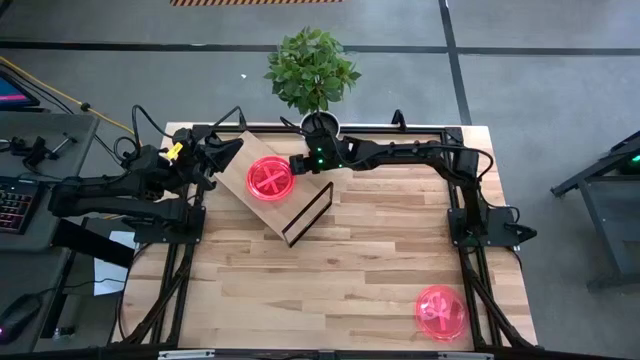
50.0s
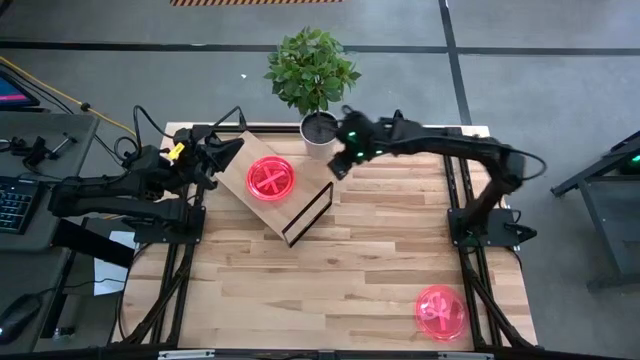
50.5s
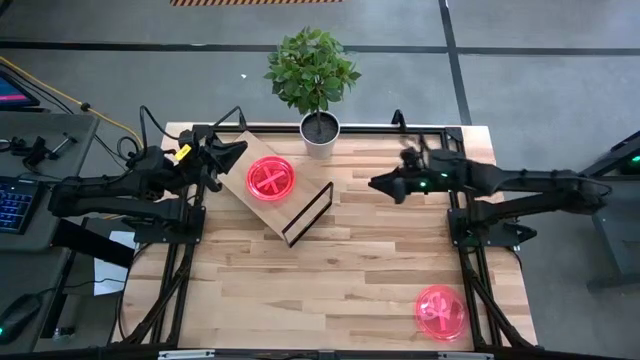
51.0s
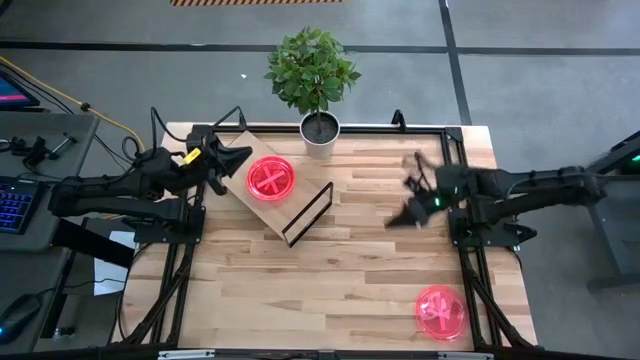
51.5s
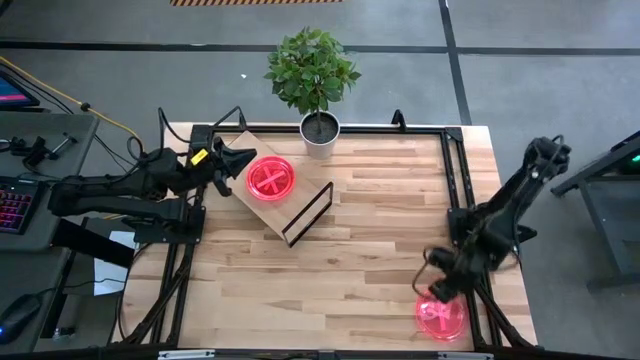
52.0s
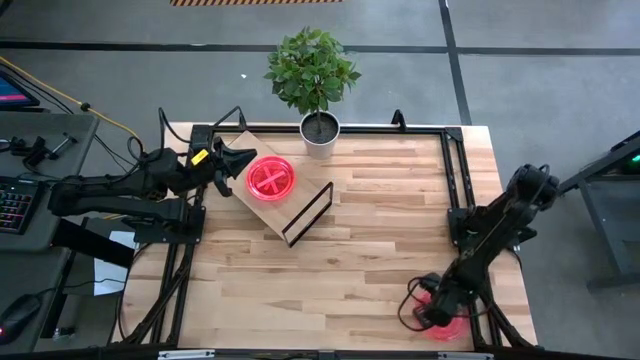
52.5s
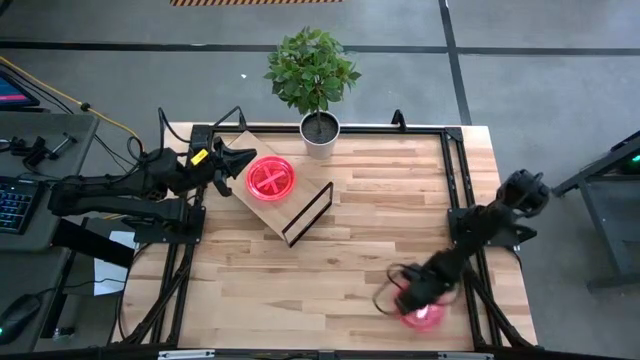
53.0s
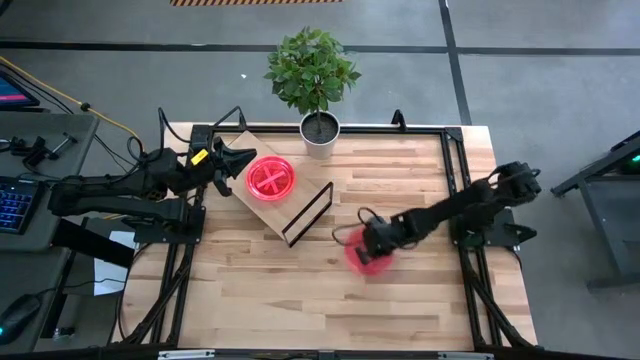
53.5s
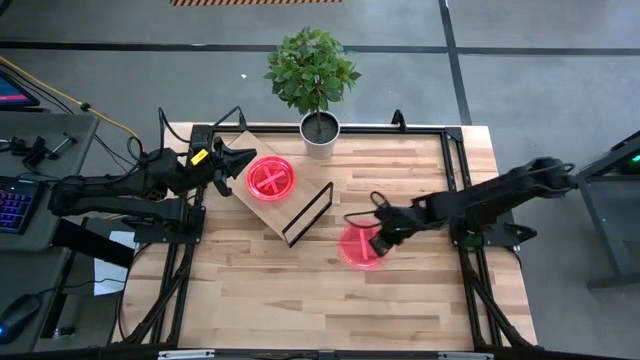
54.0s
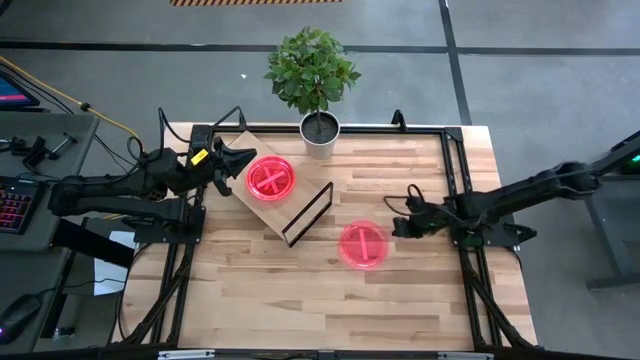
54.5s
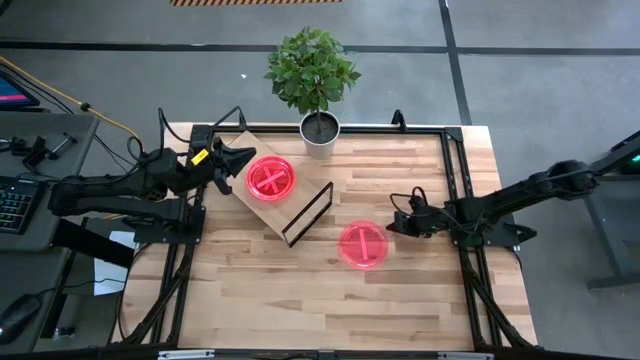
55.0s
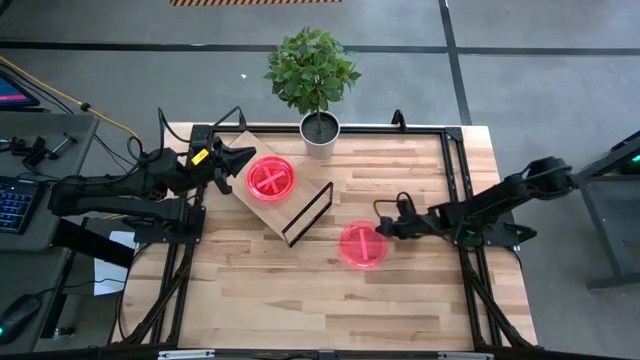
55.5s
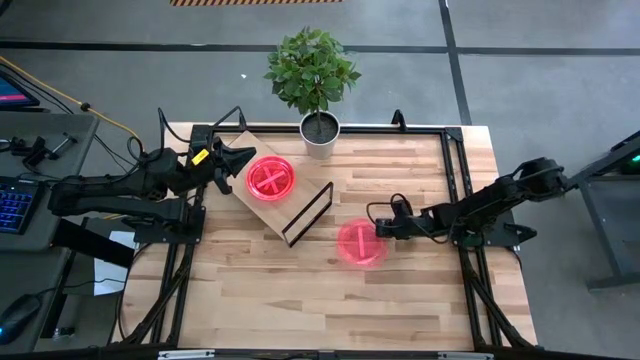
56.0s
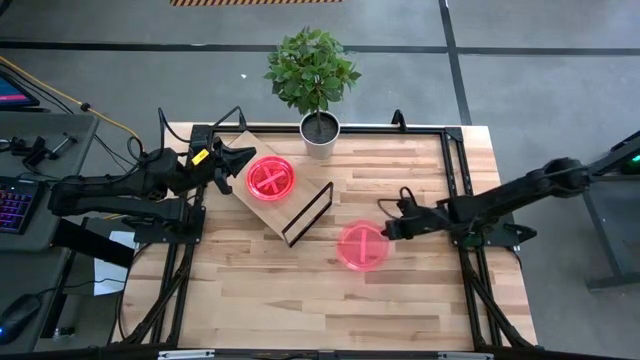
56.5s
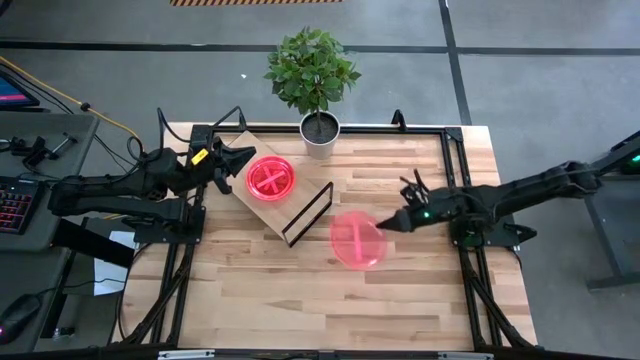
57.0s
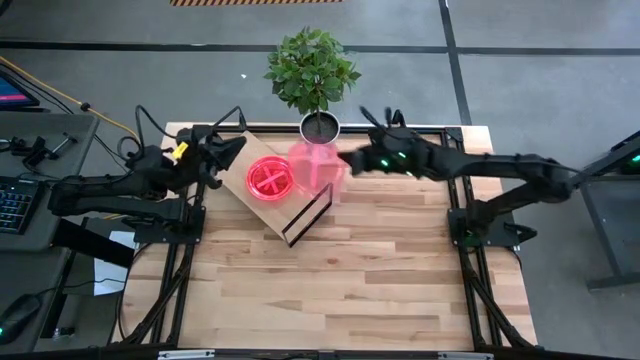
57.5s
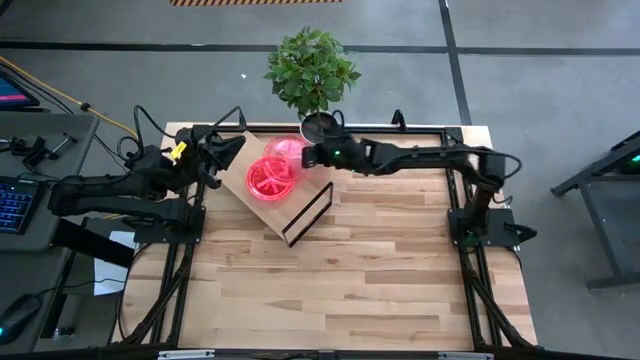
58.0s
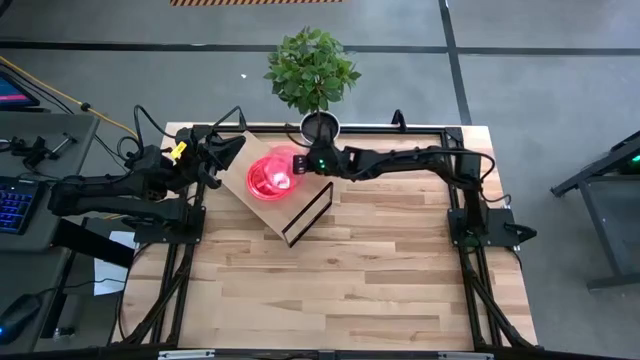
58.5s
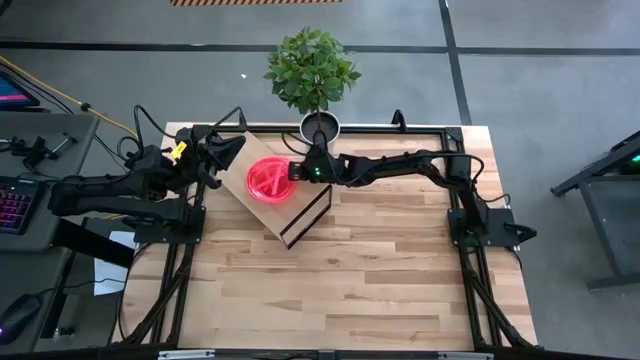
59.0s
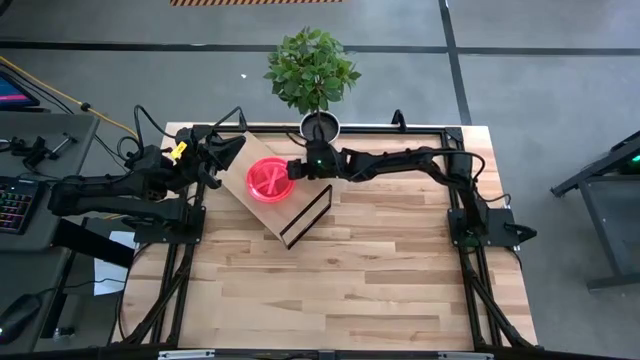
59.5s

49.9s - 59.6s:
Task: Place and stack plates onto a shelf
Stack the pink plate on top of the pink plate on the shelf

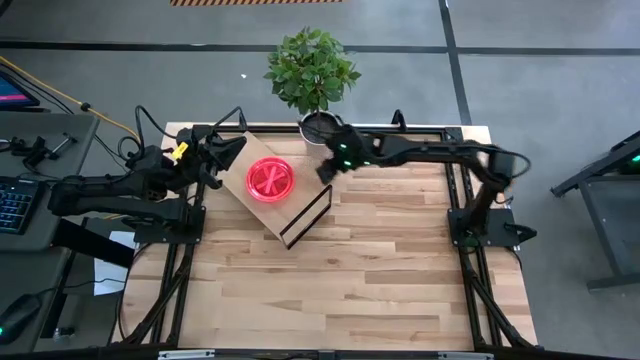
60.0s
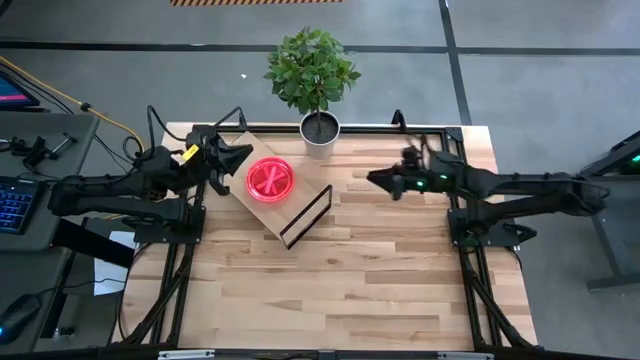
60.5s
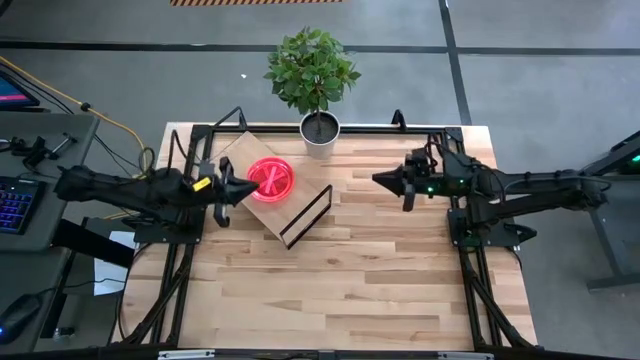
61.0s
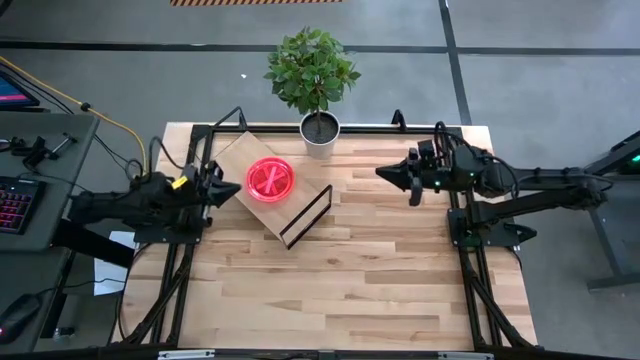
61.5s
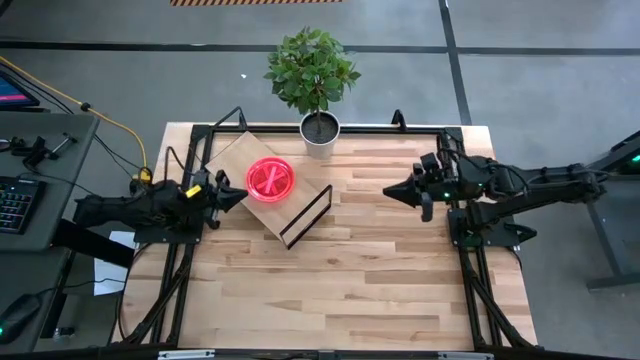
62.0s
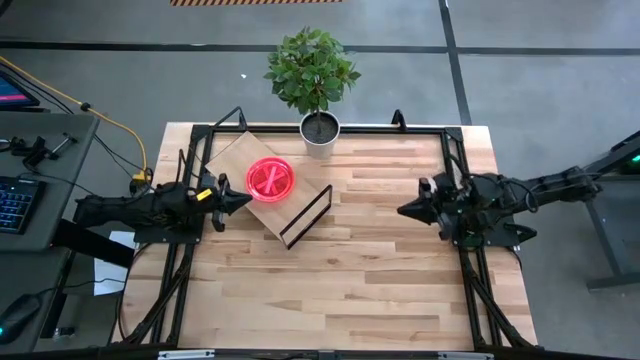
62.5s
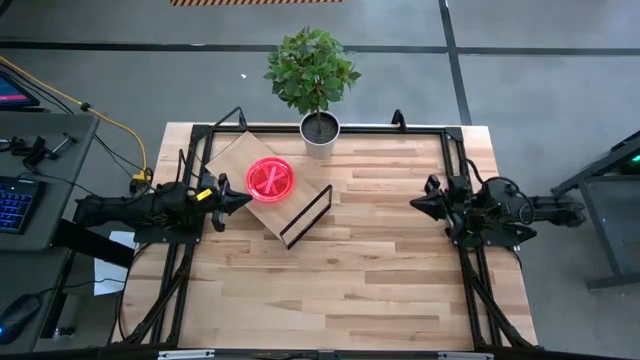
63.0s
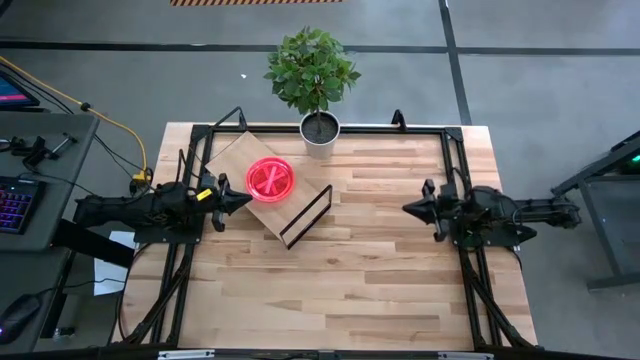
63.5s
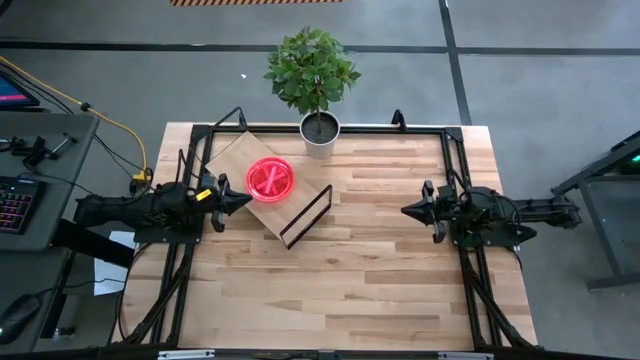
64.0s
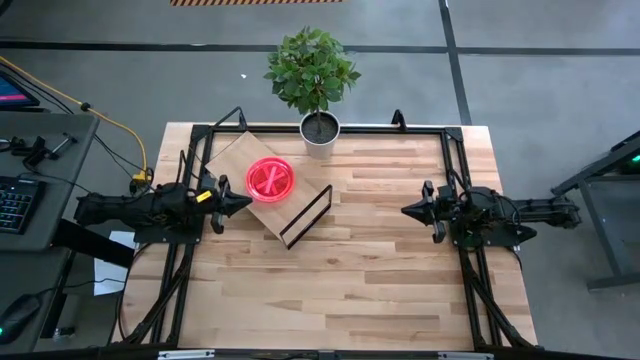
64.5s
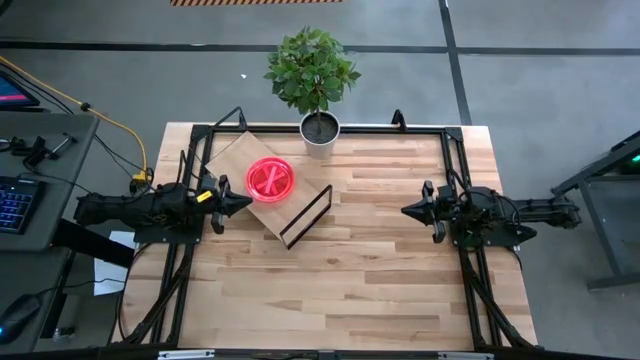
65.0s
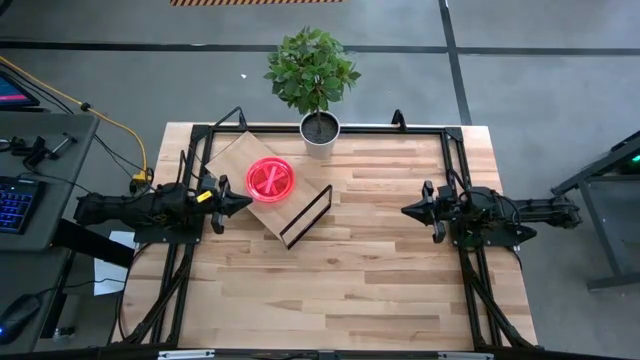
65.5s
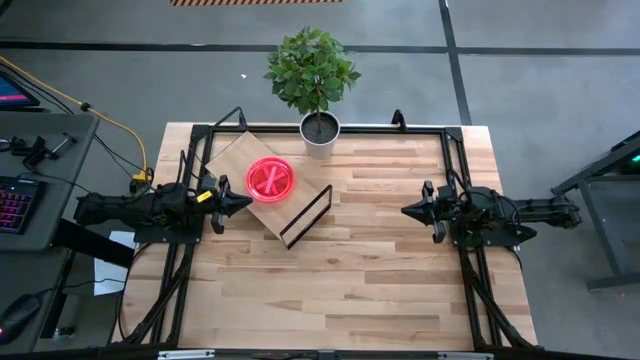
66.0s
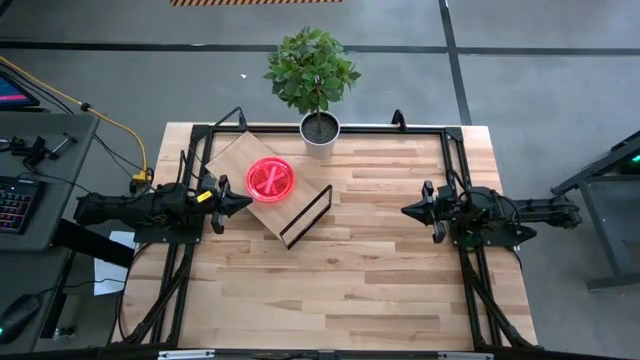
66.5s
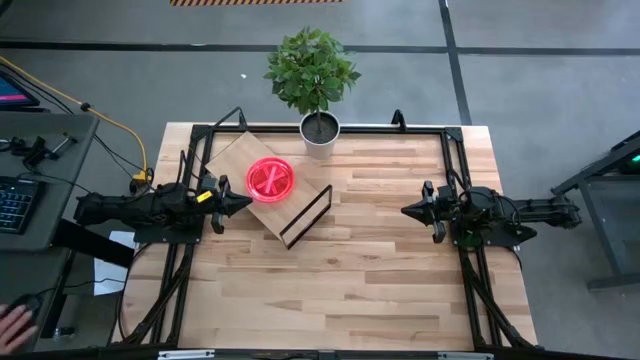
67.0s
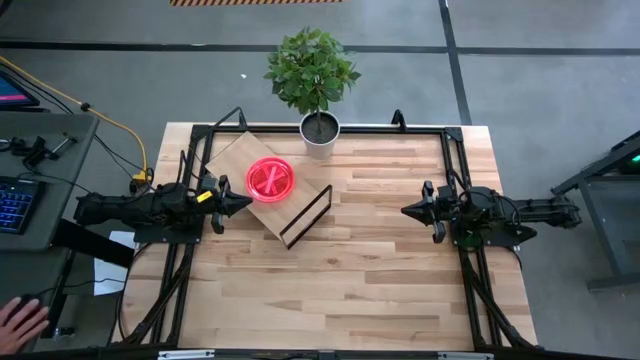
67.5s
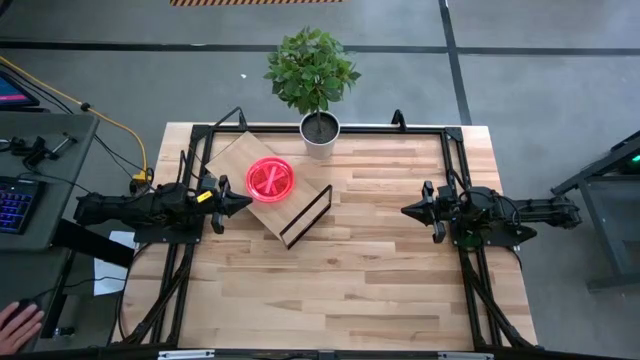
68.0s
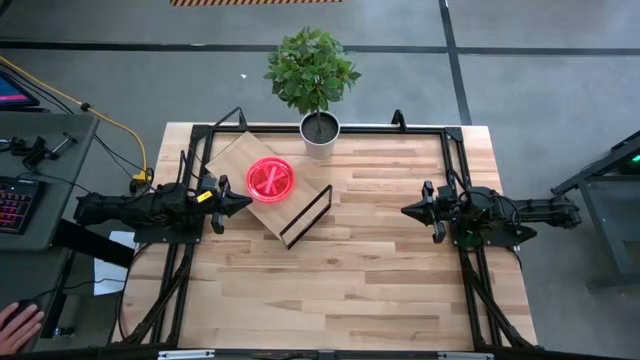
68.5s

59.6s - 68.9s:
Return to Home Position

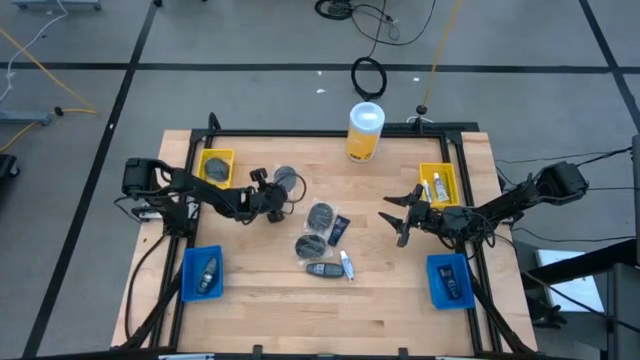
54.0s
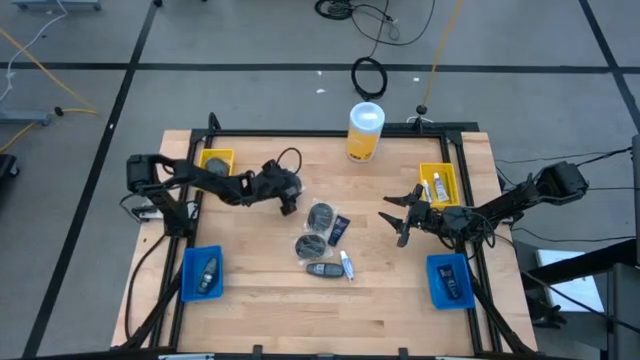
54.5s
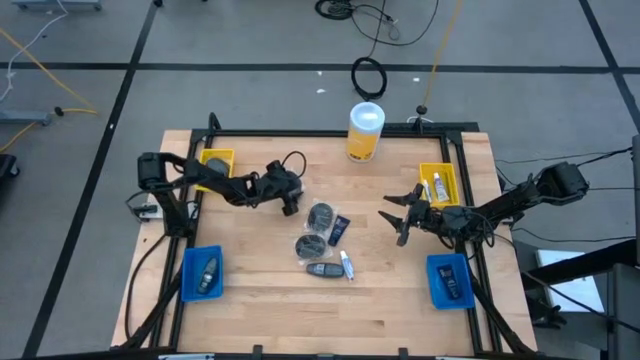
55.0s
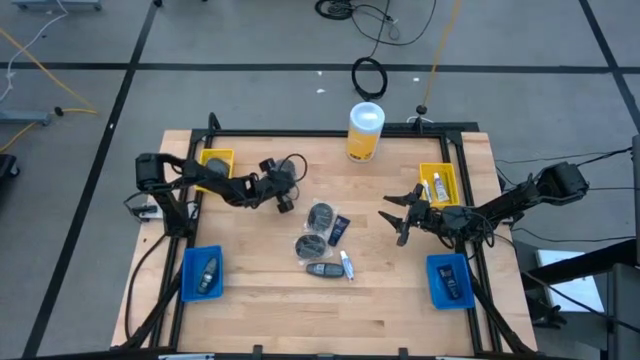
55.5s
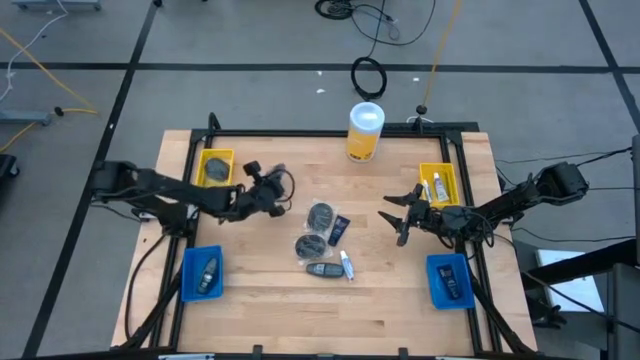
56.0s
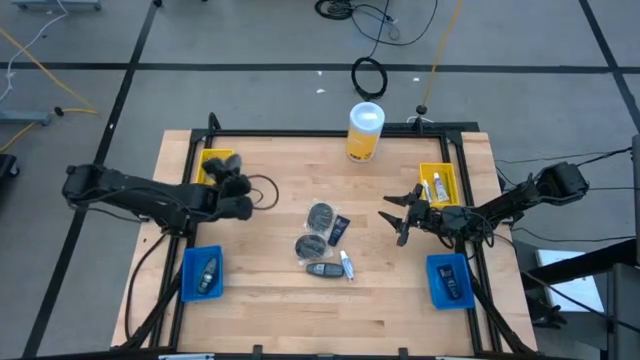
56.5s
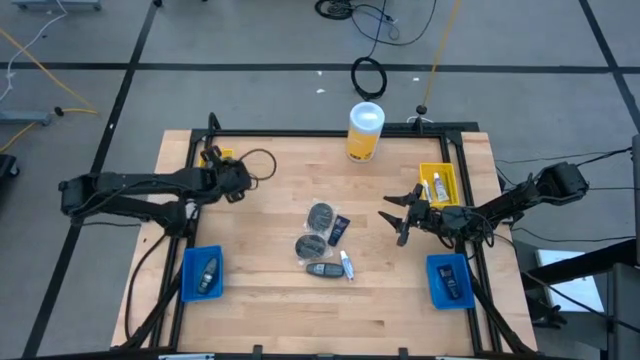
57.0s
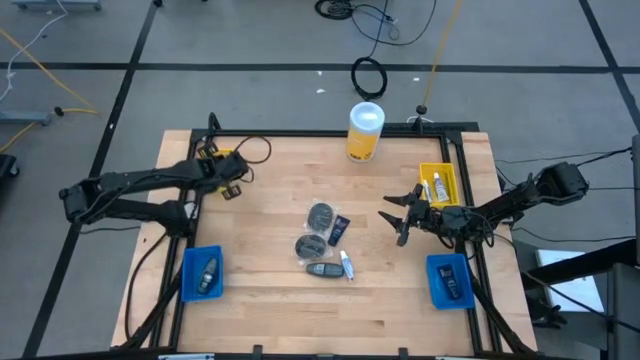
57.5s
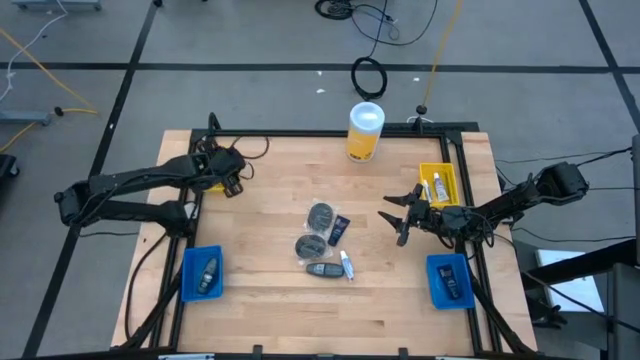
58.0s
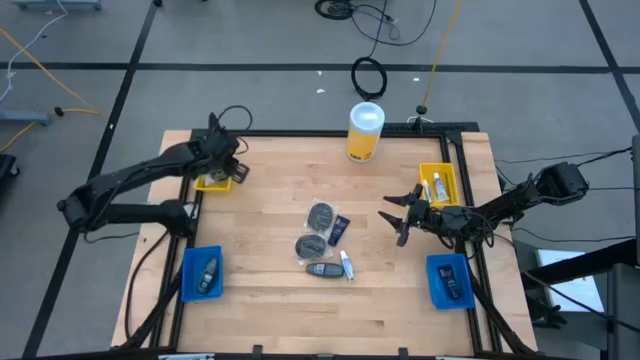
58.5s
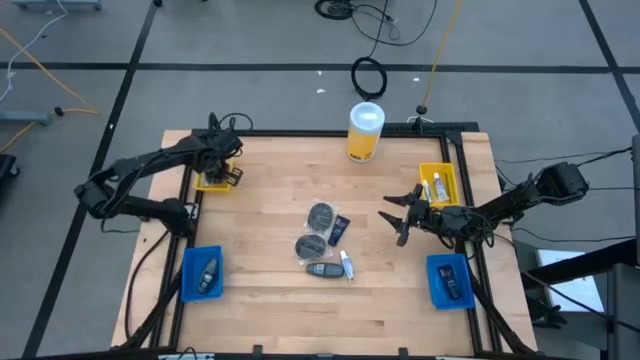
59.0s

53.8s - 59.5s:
Task: Pick & Place Travel size toiletries
Put the black hairbrush into the left yellow bin
